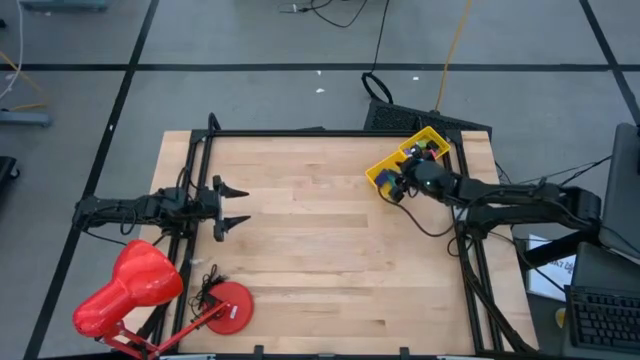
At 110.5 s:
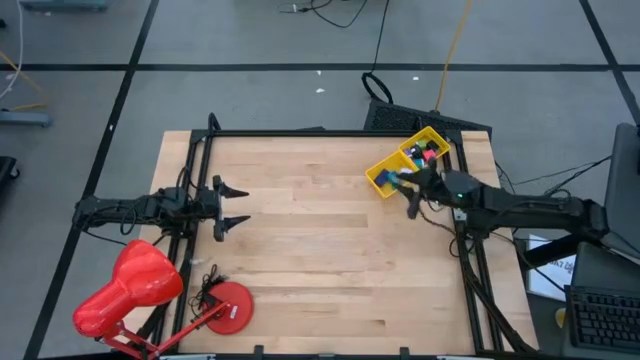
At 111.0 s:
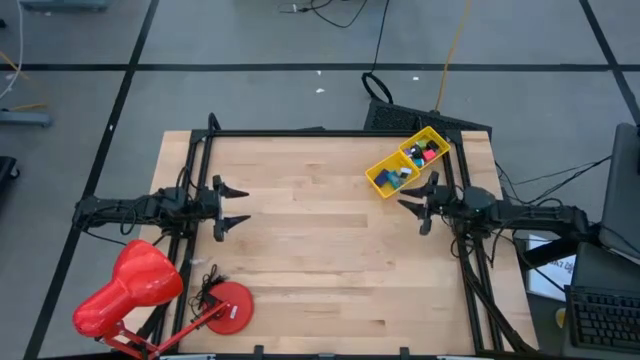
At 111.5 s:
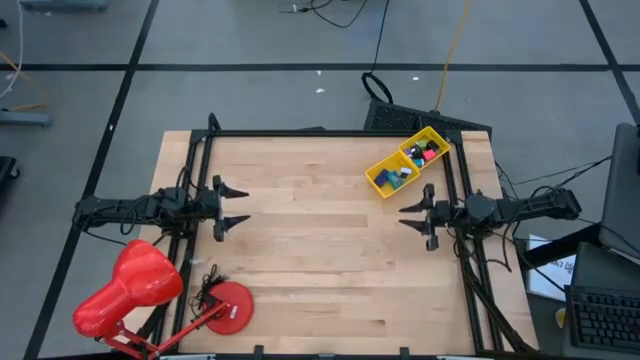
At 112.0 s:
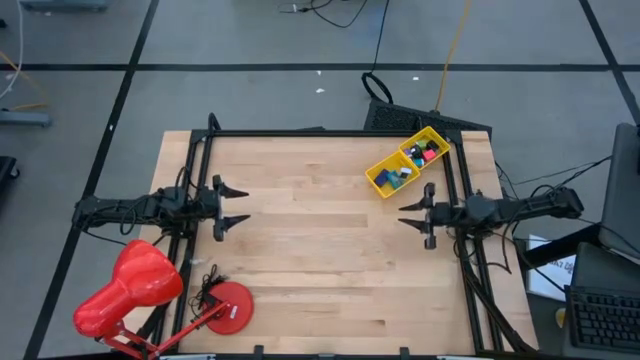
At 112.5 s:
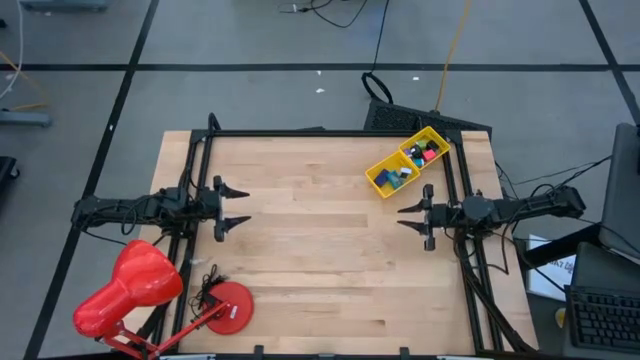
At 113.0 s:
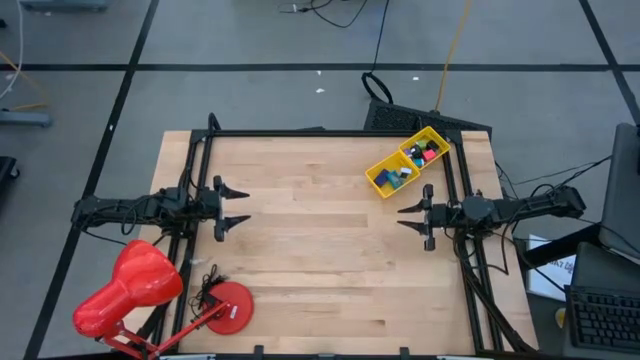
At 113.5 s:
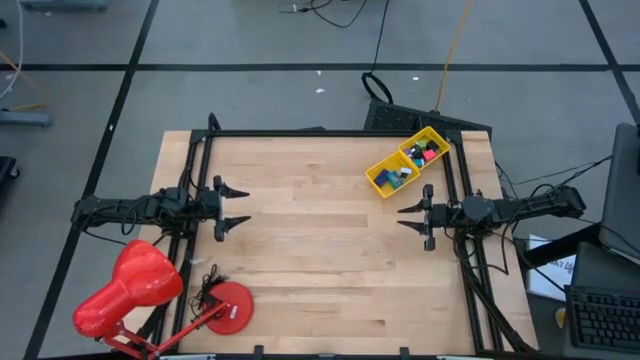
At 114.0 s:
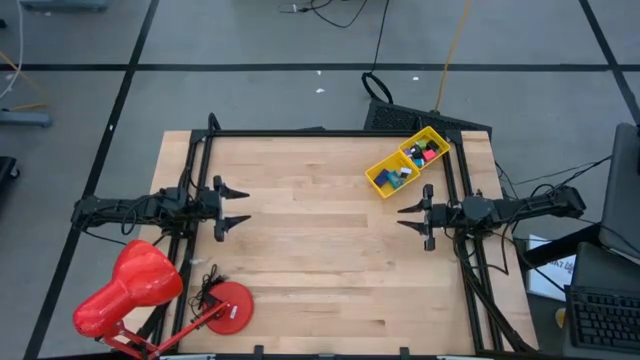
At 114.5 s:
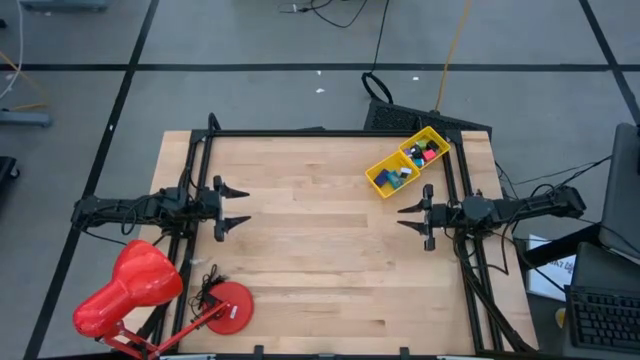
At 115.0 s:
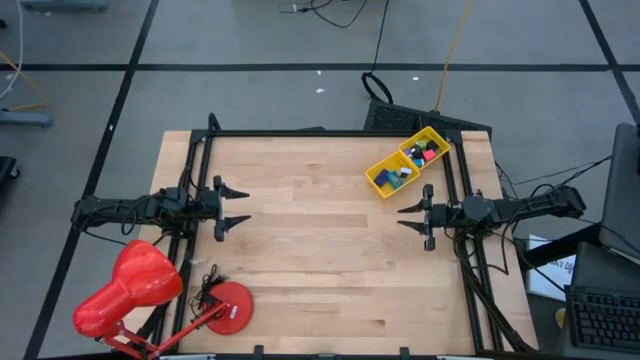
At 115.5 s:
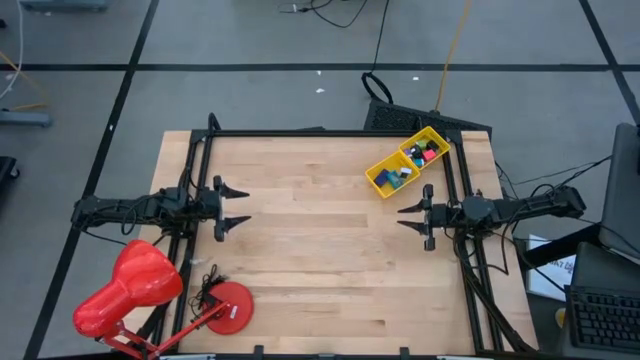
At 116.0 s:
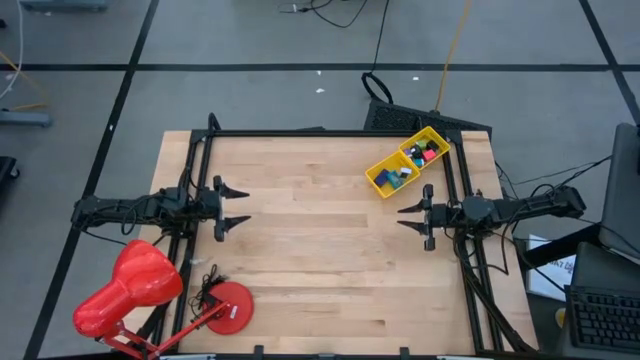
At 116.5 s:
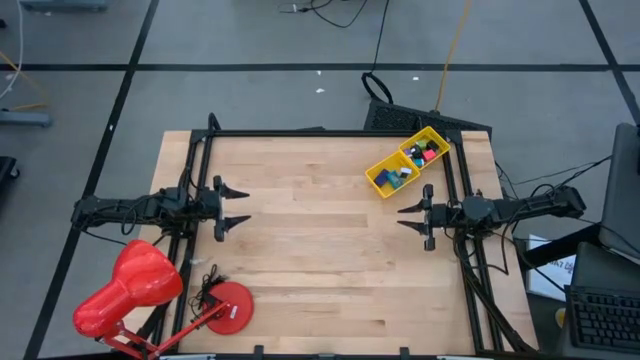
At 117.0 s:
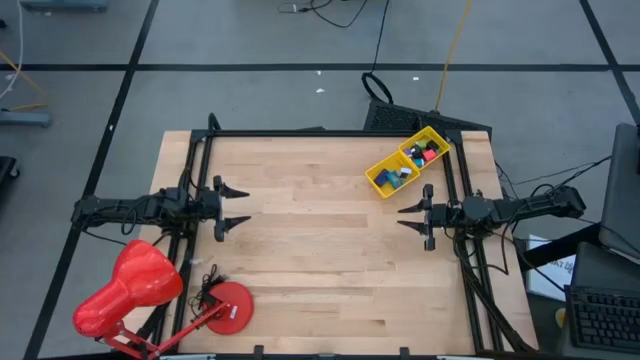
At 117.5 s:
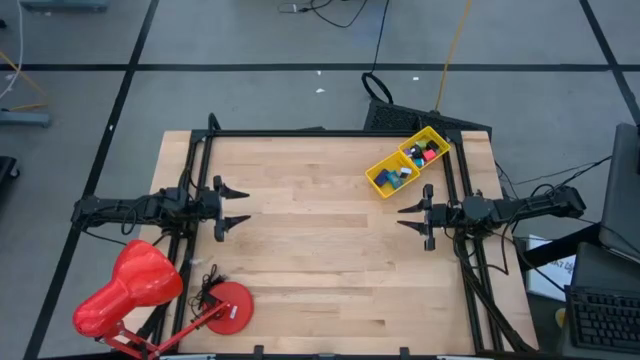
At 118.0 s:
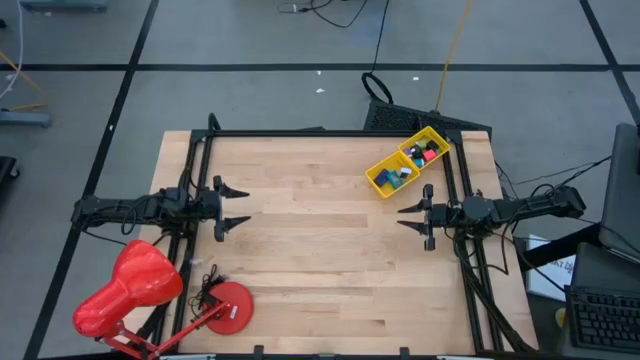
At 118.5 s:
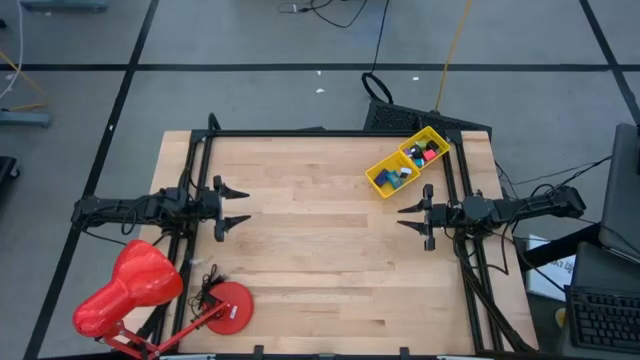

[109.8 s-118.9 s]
Task: Pick & Place Office items
Return to Home Position

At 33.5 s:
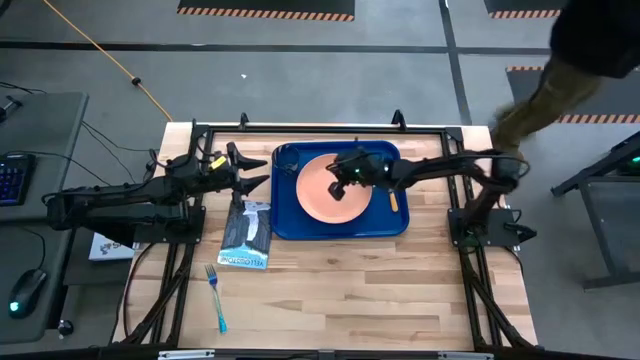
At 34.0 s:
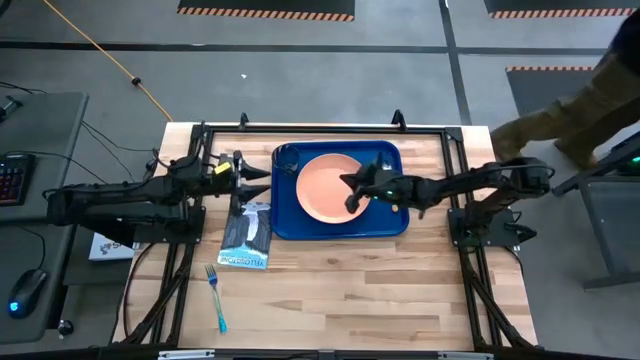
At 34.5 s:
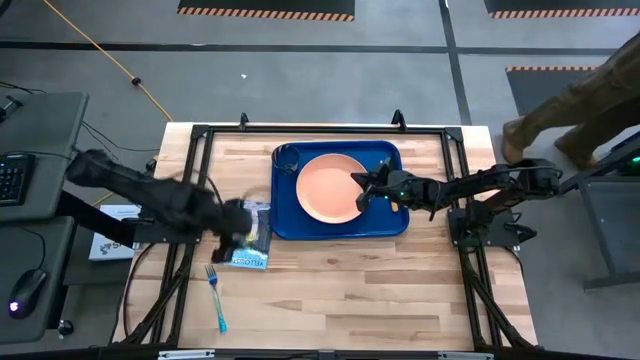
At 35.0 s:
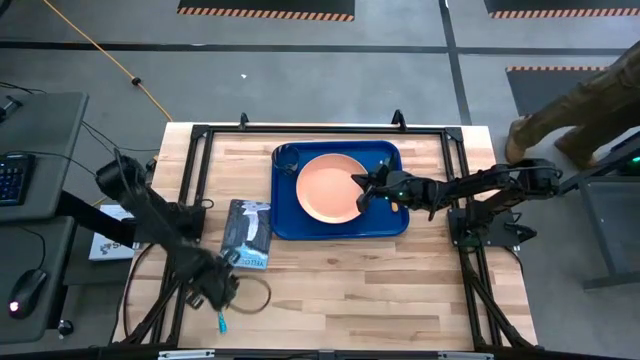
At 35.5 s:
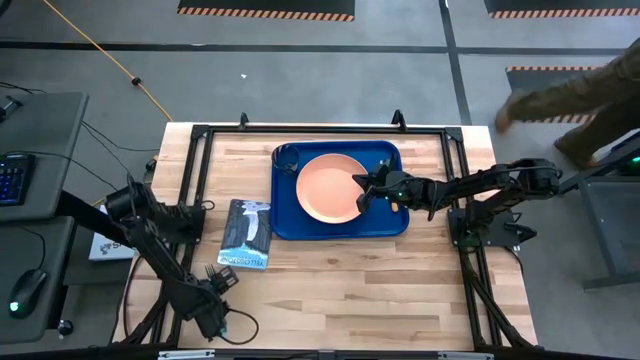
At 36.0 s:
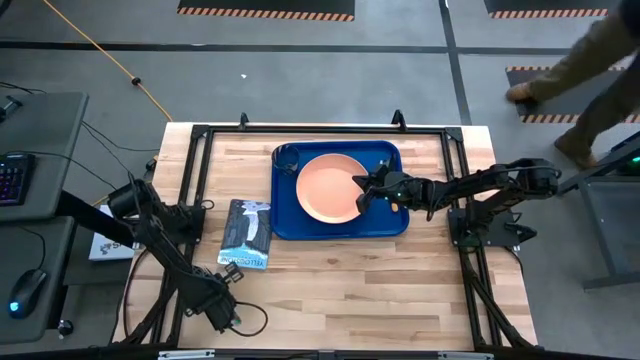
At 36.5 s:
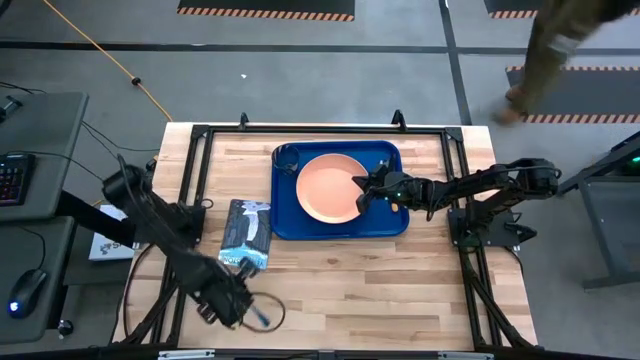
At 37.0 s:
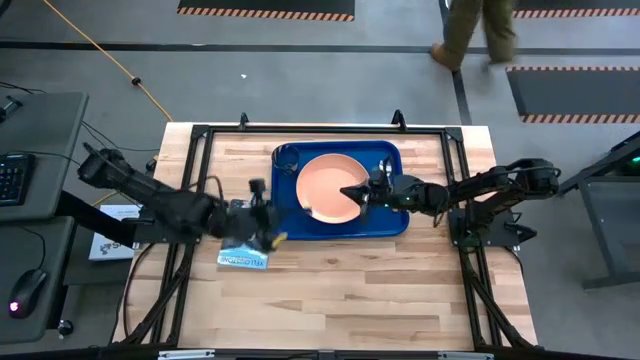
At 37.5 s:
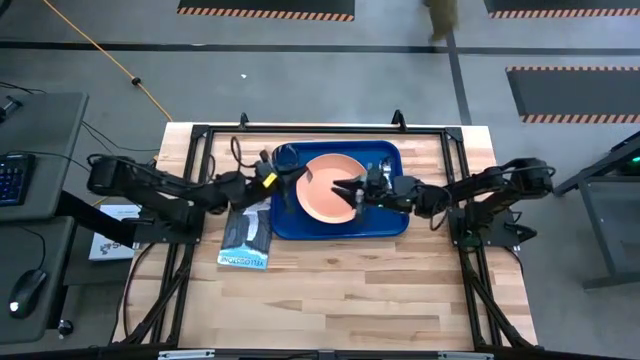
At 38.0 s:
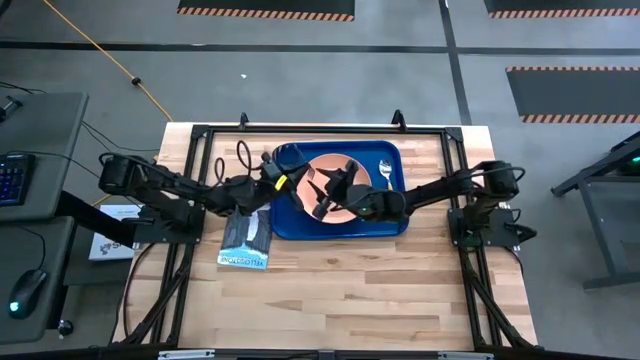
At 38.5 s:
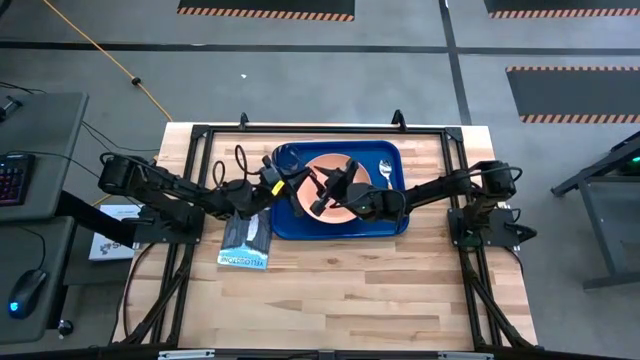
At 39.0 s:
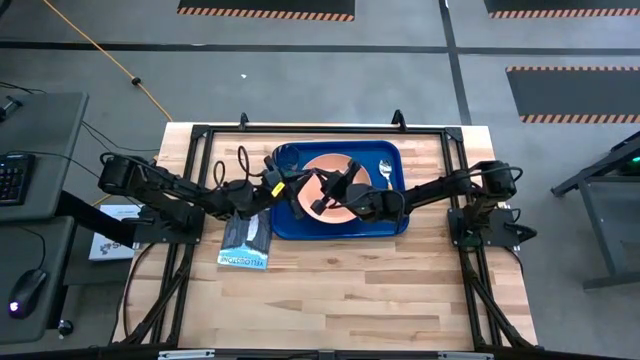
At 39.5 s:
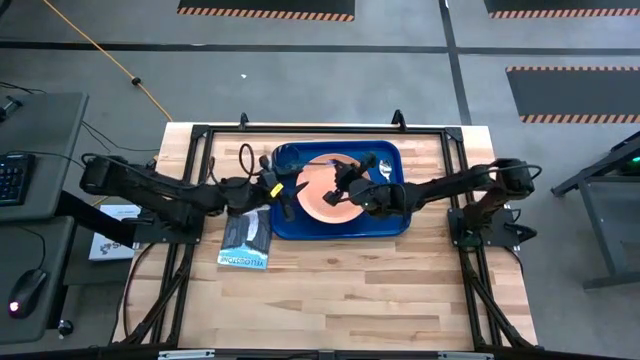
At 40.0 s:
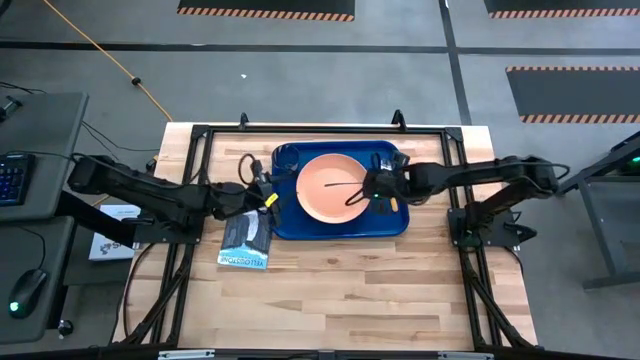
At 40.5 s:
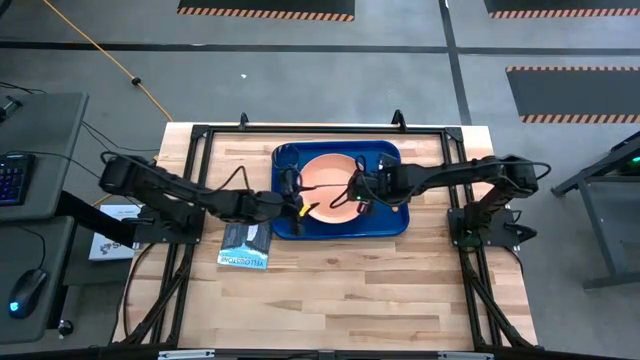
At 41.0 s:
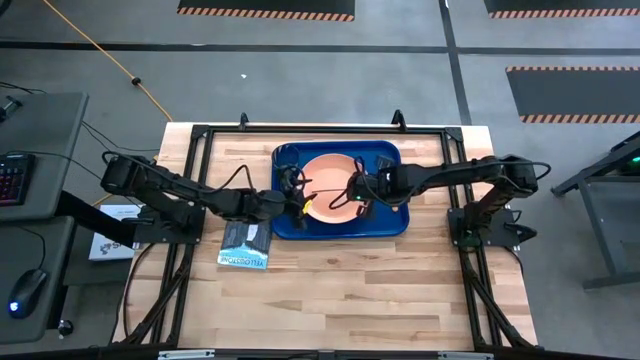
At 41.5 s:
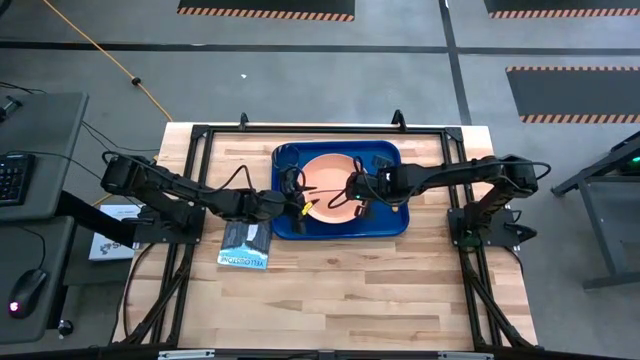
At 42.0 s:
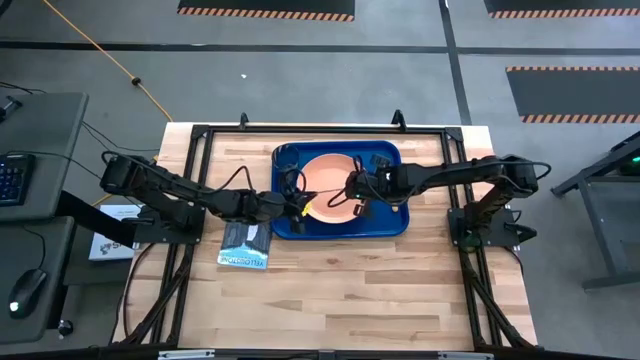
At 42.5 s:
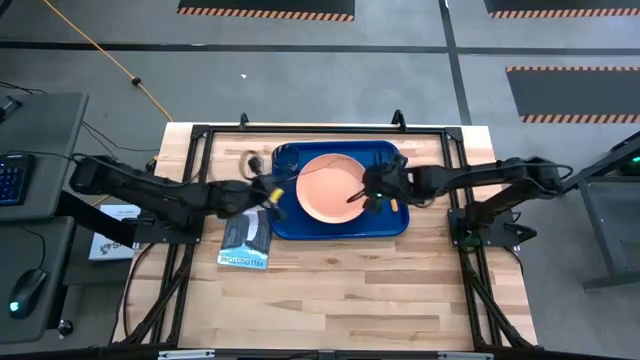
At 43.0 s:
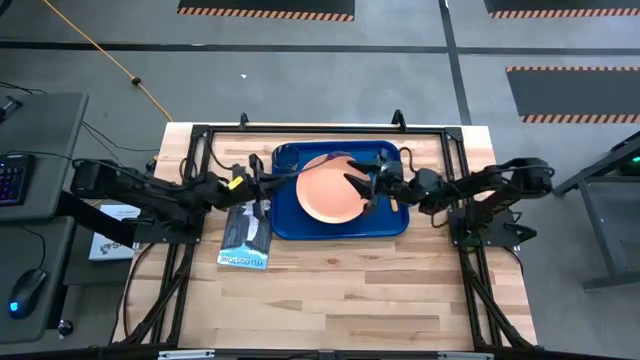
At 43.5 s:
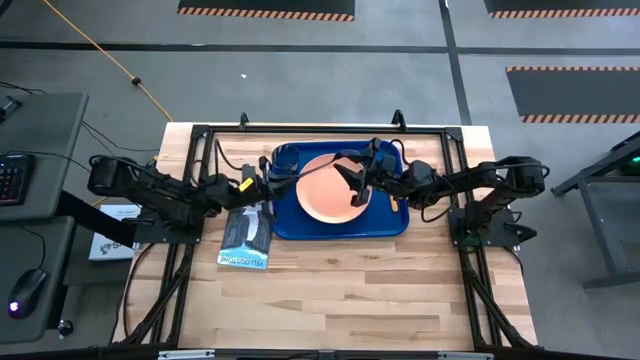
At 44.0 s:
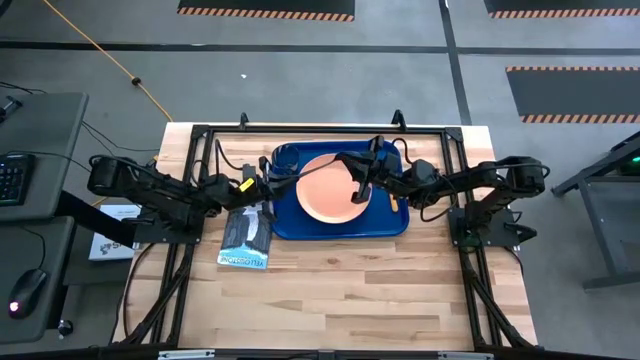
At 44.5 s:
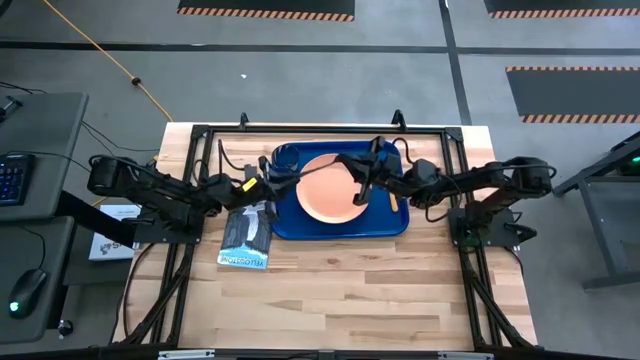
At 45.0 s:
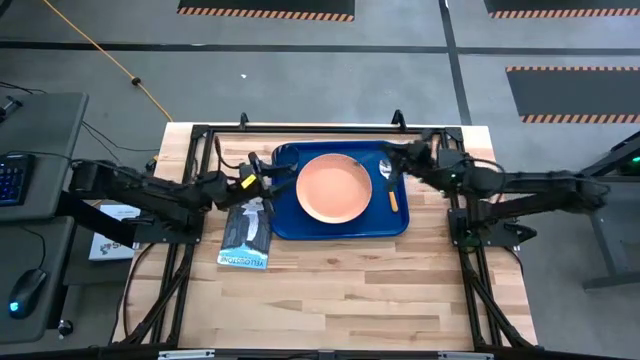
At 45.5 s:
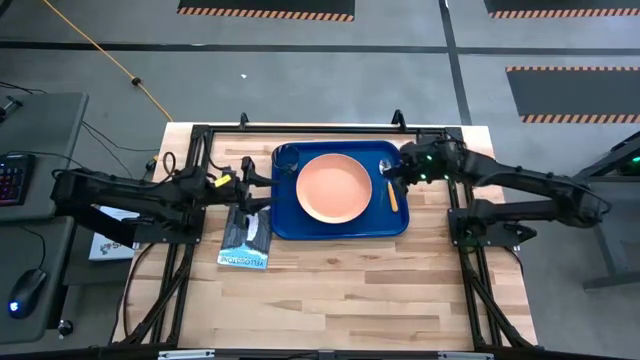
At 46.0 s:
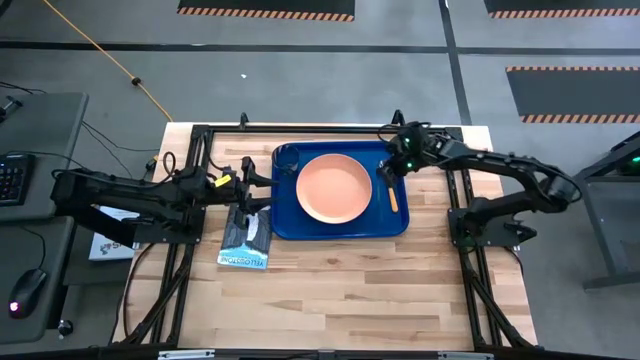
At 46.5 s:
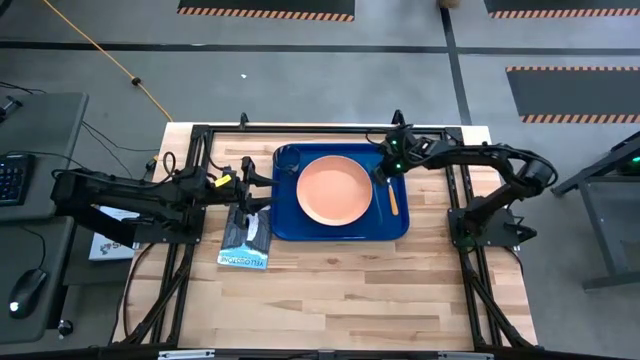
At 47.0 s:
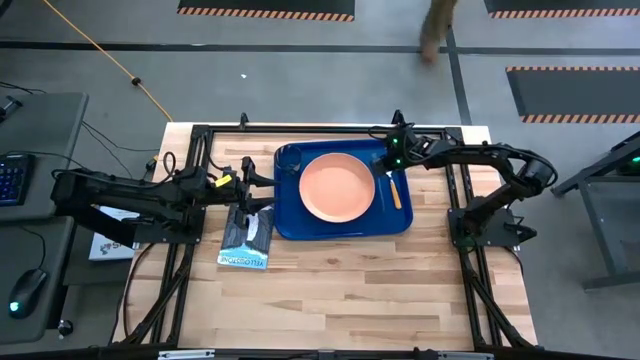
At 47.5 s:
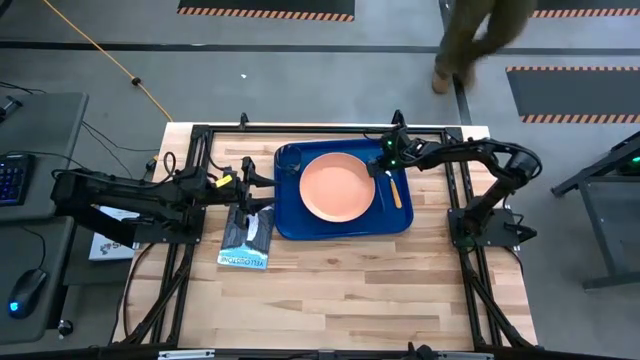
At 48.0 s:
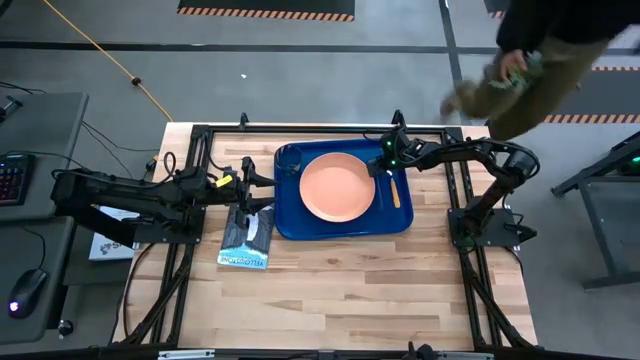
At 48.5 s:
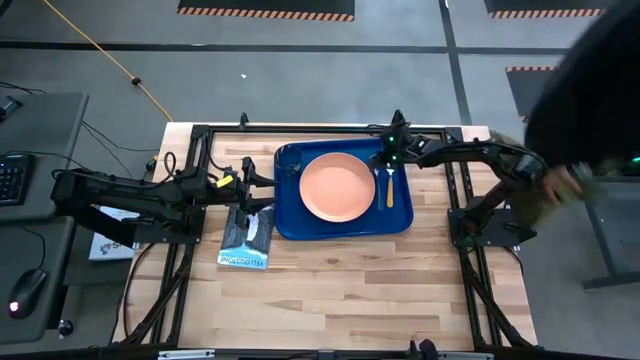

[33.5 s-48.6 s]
Task: Pick and place plate/cup/fork/spoon on tray
Put the blue fork on the blue tray to the right side of the orange plate
